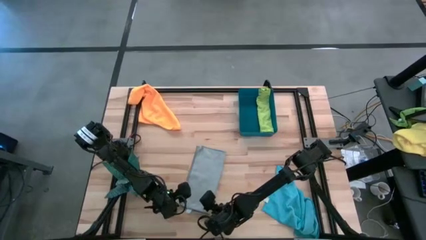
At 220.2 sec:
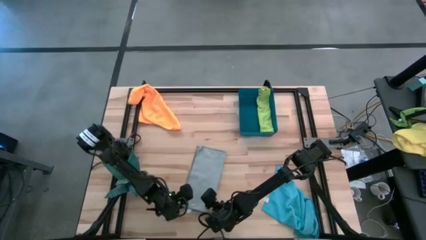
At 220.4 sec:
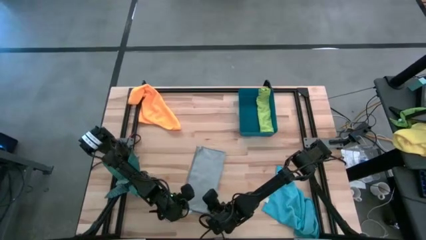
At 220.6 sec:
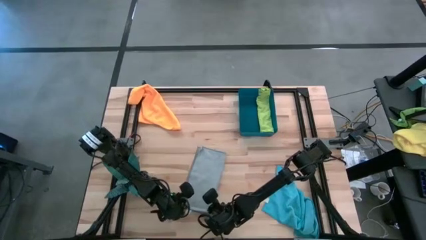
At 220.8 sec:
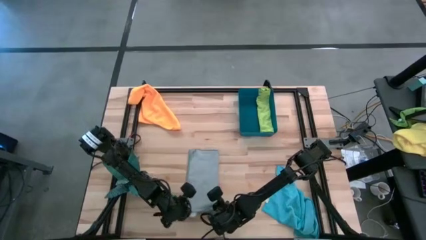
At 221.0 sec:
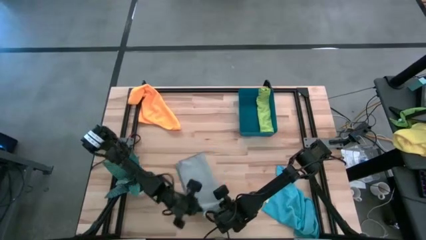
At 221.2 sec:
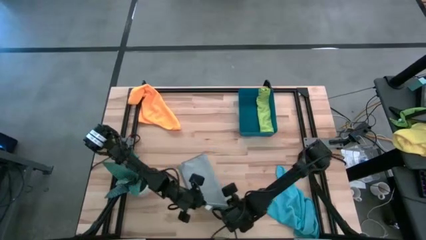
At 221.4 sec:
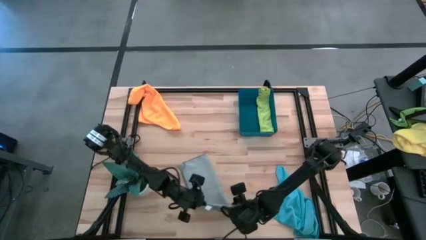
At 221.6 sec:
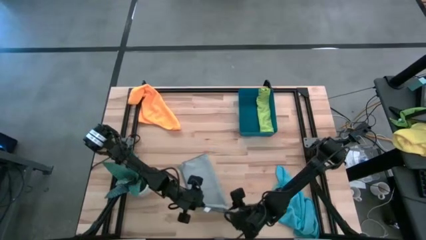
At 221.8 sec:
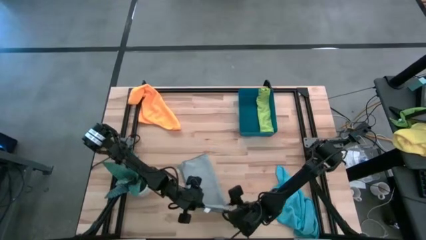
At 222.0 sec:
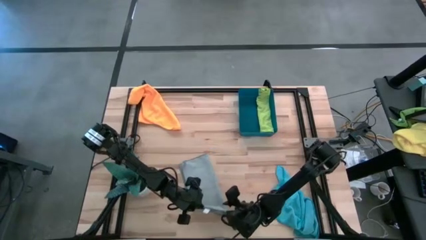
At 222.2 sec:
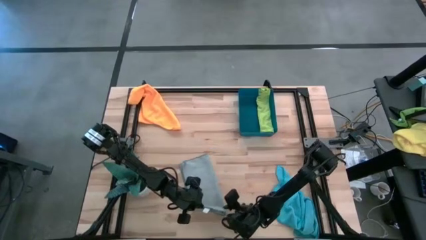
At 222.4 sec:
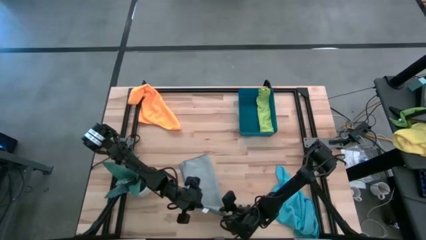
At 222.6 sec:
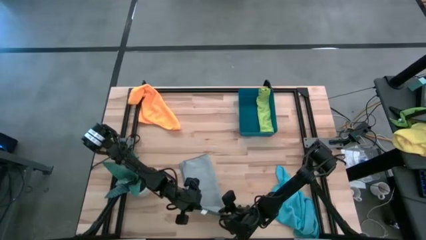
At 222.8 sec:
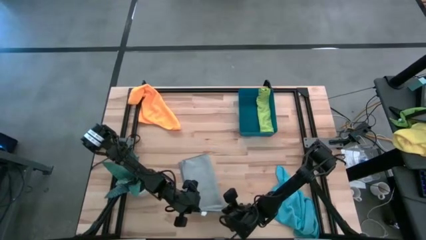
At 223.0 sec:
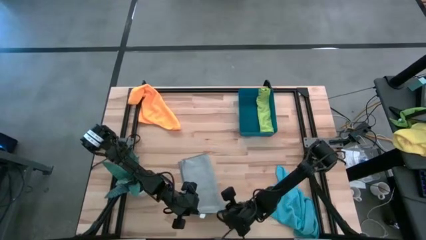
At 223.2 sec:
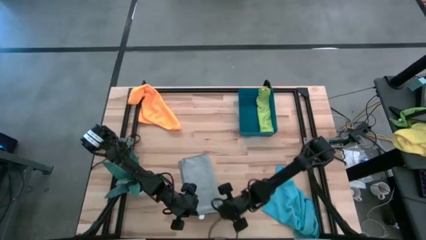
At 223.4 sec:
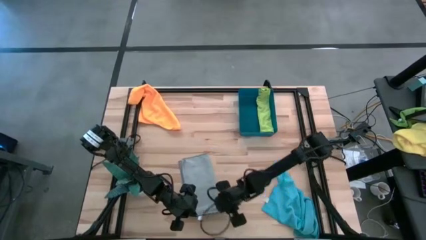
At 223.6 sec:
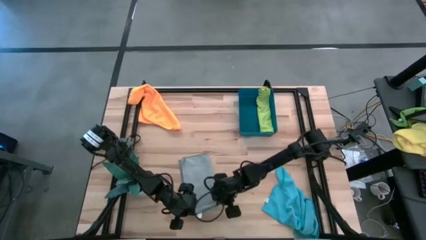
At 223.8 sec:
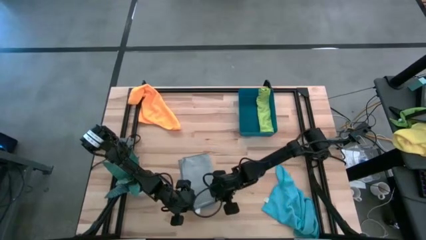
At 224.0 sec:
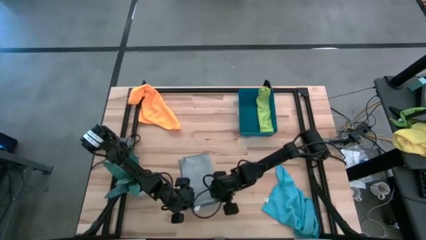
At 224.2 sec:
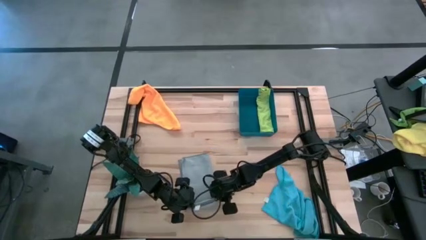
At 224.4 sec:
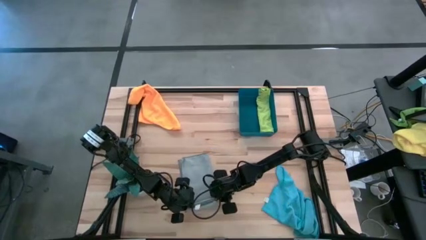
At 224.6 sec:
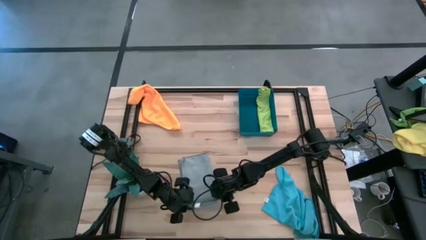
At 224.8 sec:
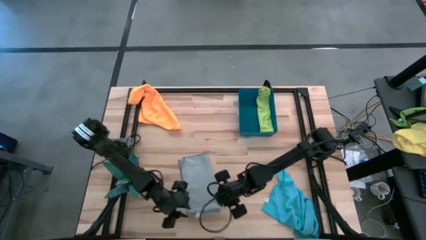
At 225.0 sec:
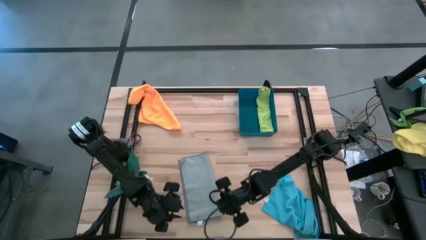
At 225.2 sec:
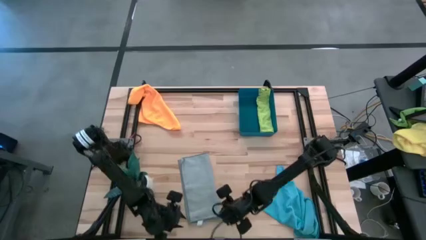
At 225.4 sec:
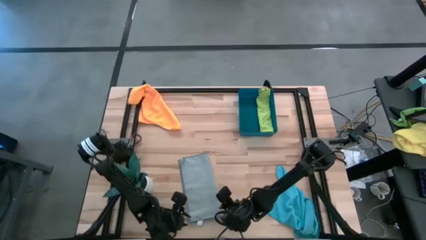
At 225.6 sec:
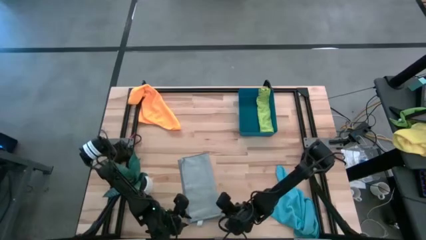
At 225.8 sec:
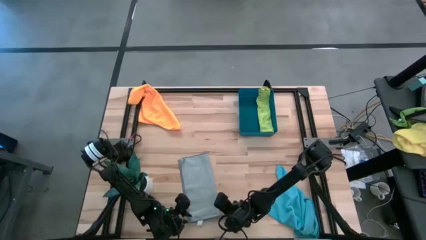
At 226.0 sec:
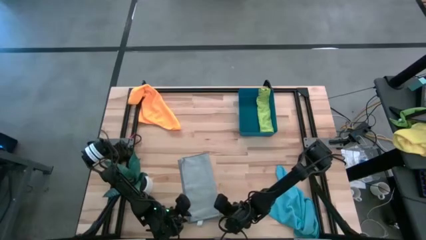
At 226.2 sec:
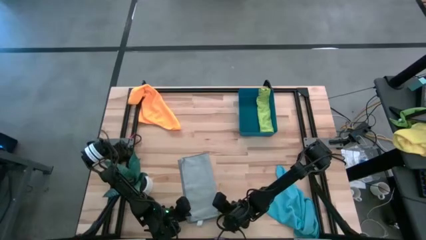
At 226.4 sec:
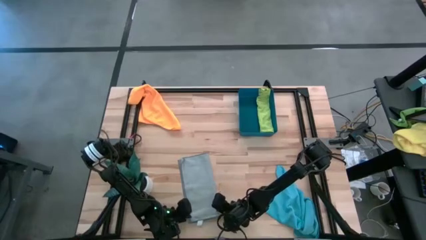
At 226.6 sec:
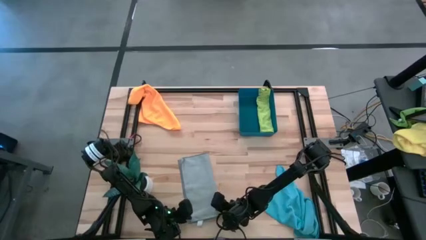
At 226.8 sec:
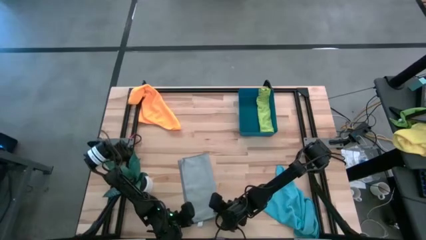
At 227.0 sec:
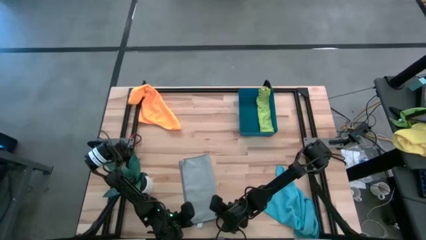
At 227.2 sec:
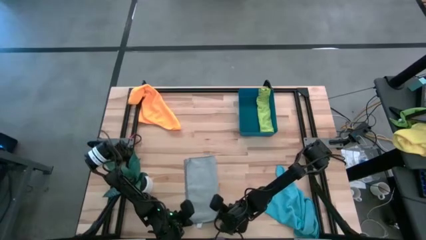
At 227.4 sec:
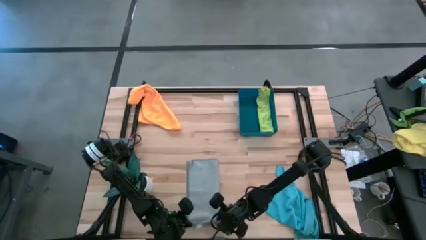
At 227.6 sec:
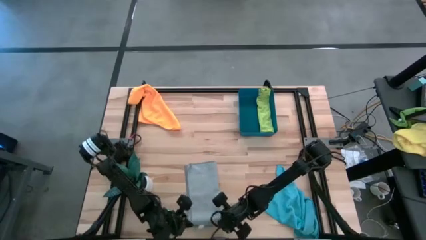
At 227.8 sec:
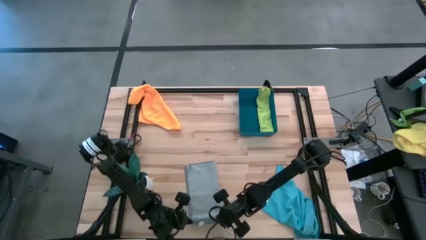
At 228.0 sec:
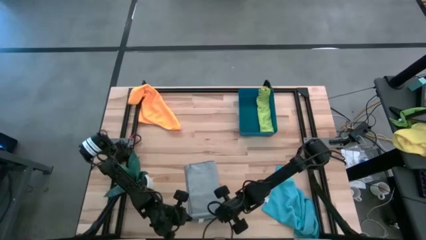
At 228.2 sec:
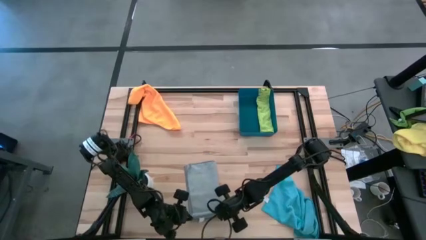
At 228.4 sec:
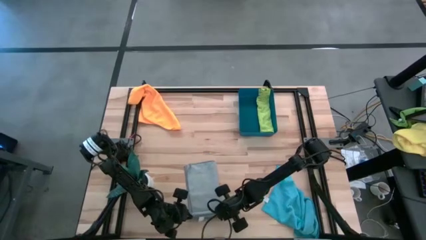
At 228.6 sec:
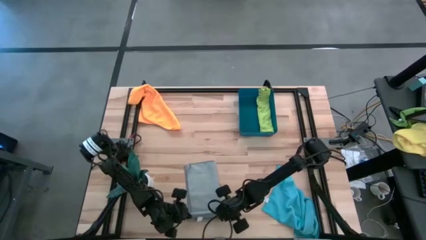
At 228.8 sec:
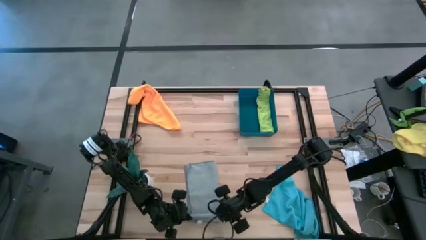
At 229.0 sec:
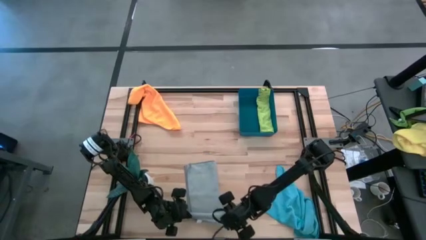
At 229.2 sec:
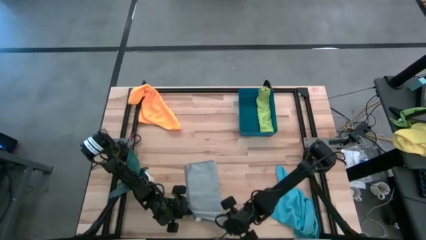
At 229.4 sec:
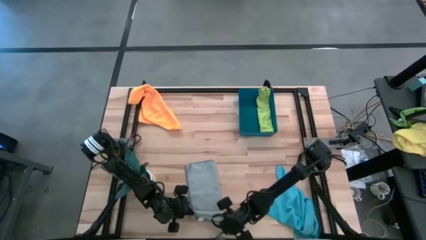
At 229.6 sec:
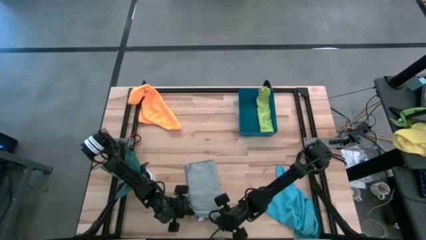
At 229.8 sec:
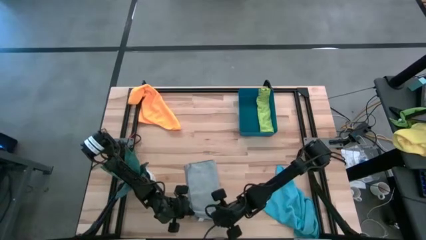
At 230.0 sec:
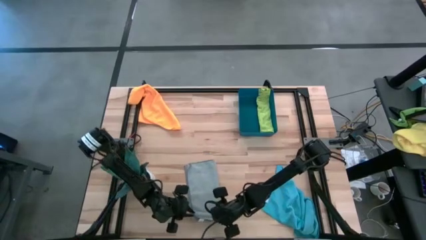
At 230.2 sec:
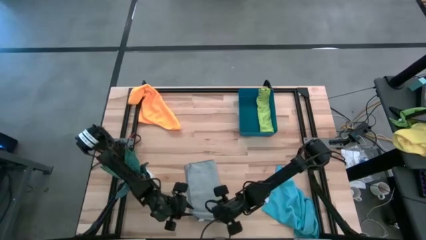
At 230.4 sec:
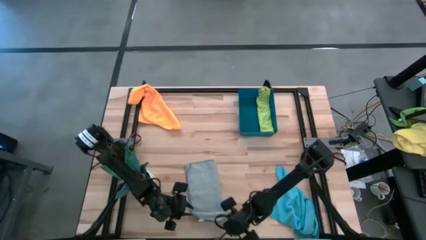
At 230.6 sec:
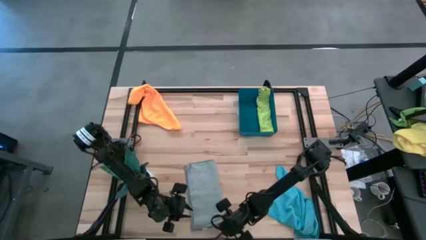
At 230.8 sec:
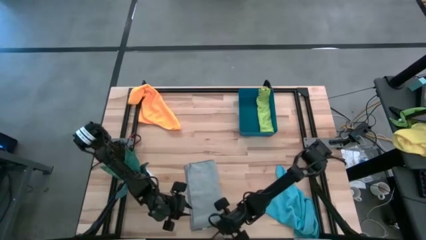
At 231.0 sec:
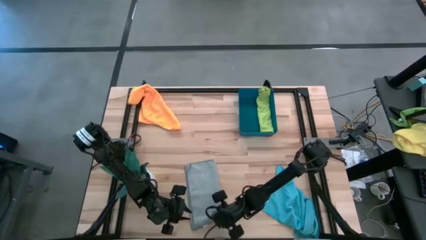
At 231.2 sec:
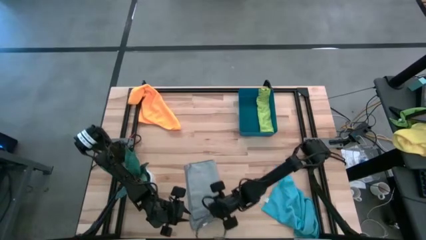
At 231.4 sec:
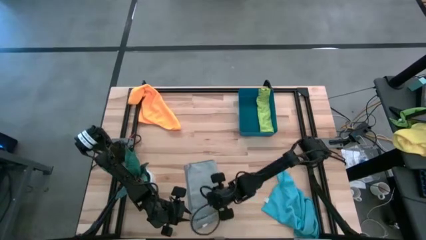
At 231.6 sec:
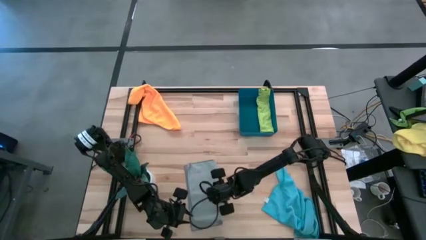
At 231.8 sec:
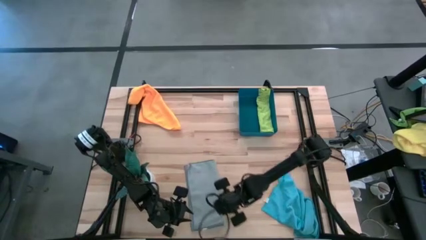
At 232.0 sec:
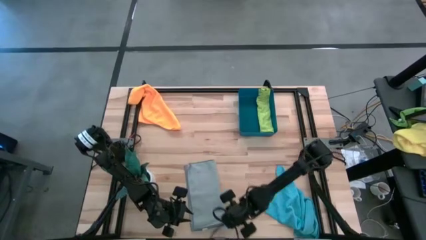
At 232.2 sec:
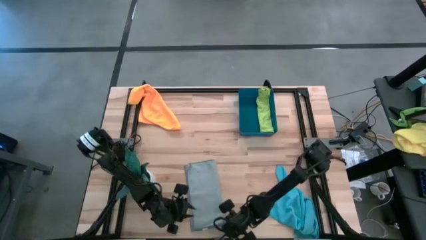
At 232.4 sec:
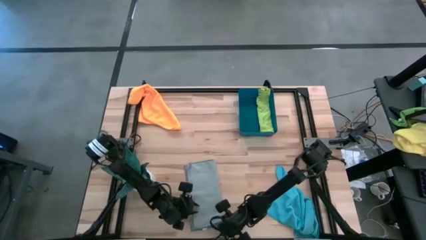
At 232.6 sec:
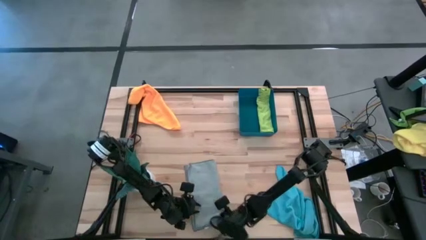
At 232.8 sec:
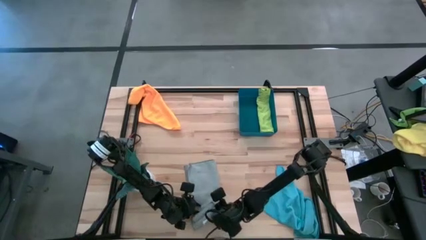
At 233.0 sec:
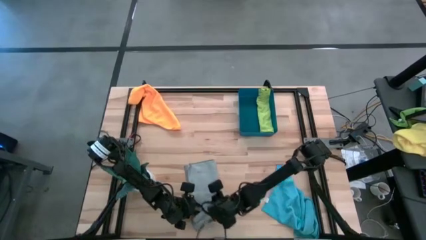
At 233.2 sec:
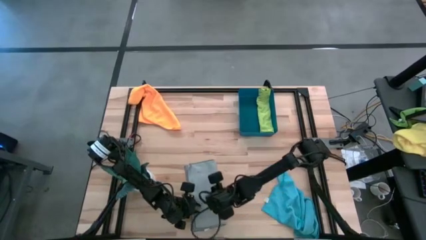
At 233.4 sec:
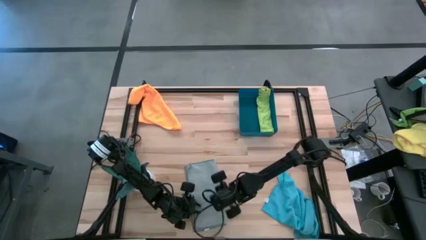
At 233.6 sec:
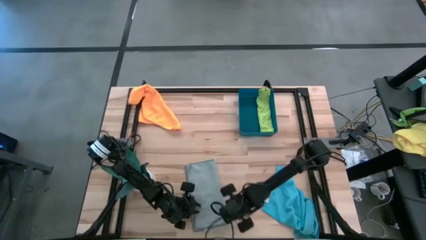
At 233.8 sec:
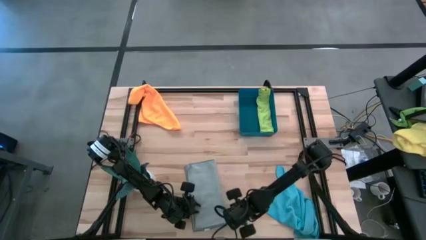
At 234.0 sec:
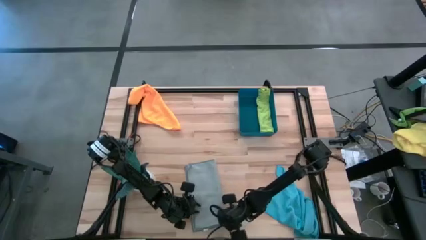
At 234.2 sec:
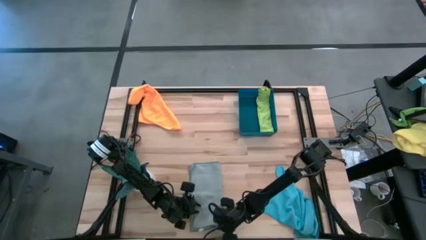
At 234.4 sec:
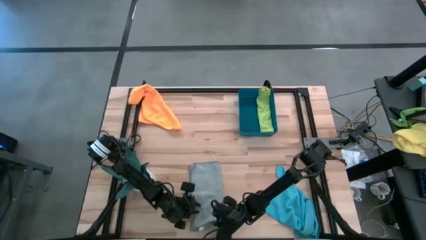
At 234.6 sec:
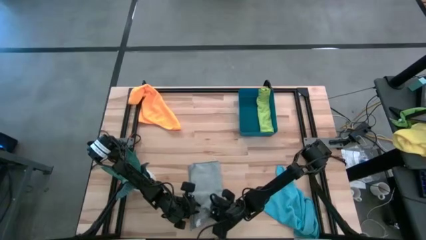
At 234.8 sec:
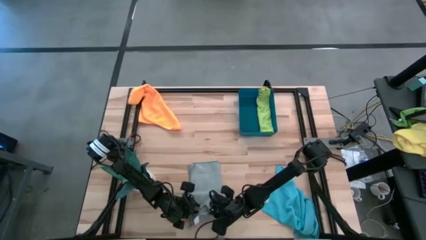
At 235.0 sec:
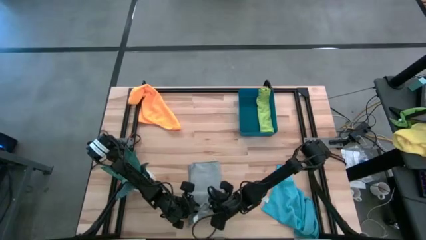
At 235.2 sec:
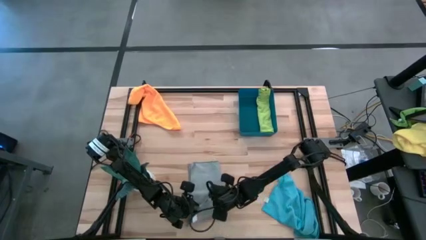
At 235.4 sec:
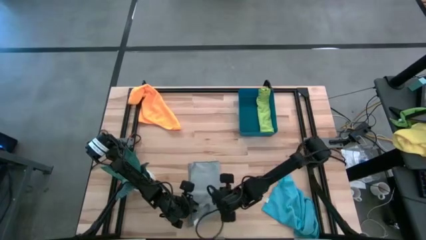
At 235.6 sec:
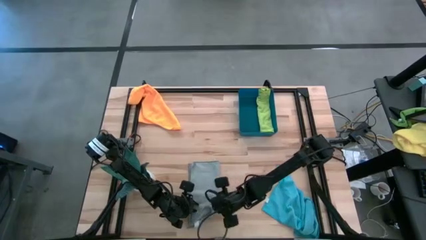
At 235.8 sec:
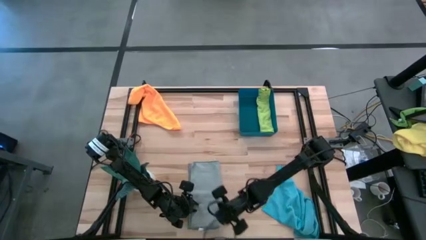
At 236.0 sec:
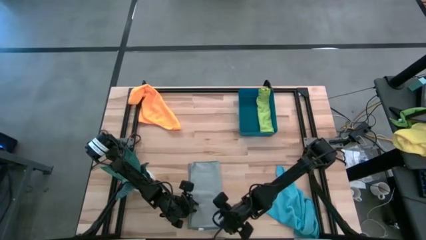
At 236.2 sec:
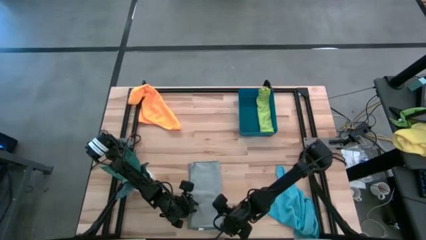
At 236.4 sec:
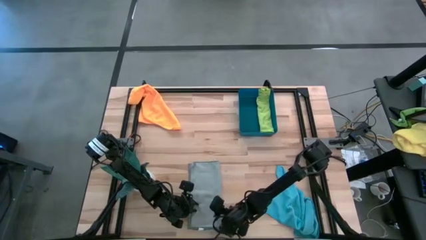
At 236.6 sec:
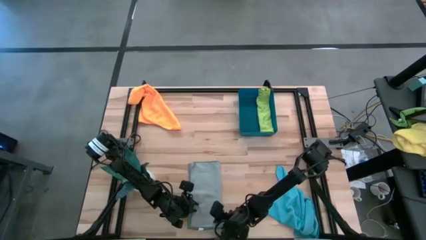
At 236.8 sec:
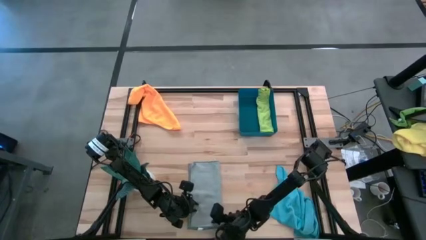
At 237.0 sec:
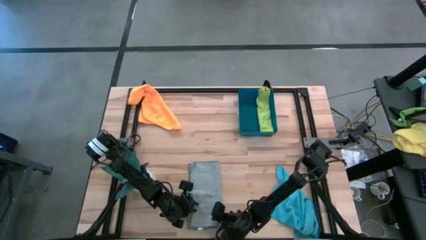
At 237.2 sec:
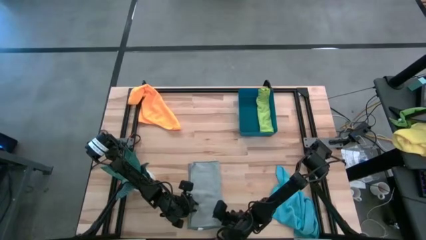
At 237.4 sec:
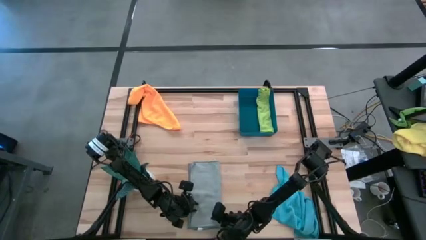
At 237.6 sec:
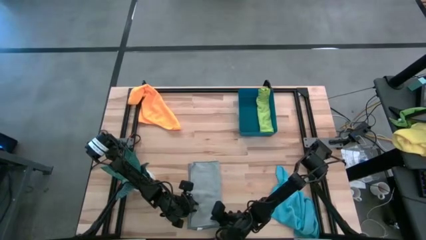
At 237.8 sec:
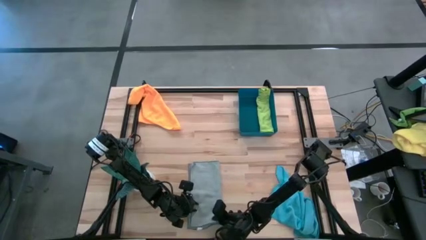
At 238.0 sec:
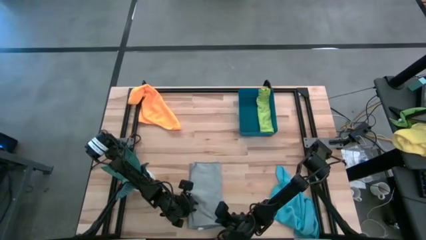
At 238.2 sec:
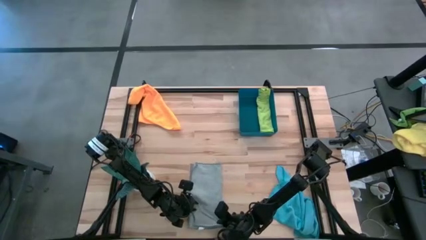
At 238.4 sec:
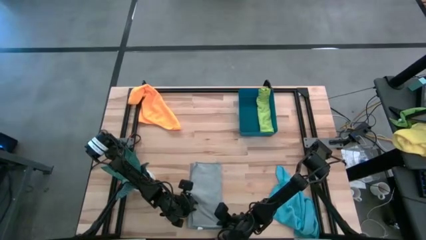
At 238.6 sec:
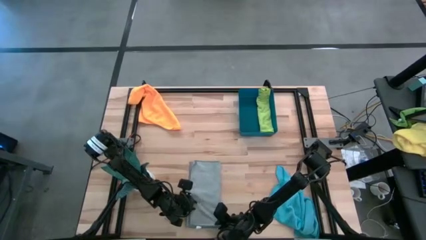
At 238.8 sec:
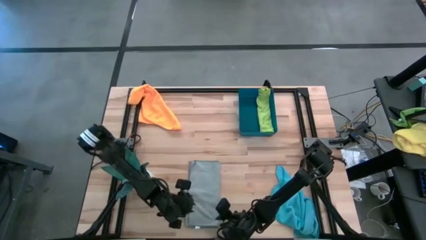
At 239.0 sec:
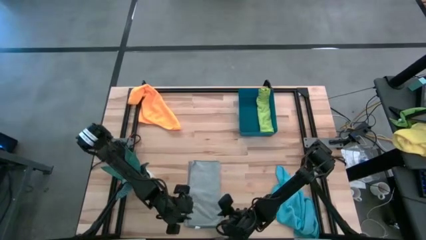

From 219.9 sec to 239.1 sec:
Task: Roll microfiber towels into tight, uniform cylinder then place into a basket
Roll the gray towel
